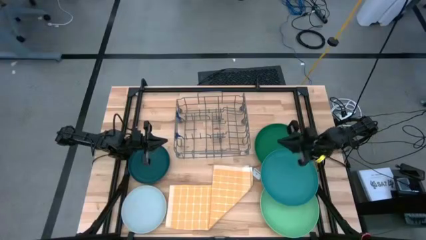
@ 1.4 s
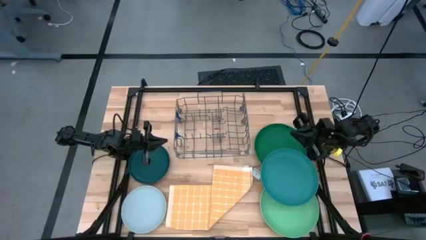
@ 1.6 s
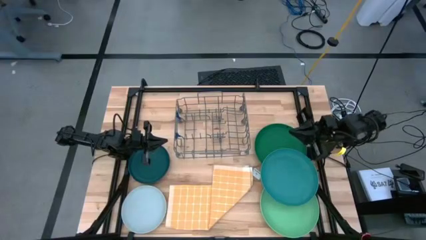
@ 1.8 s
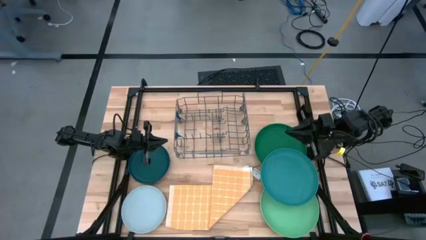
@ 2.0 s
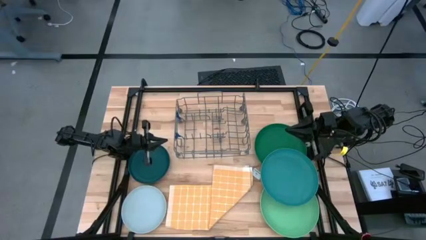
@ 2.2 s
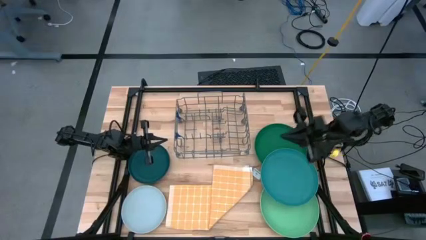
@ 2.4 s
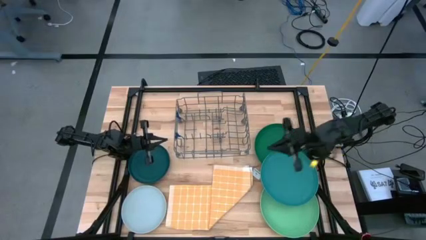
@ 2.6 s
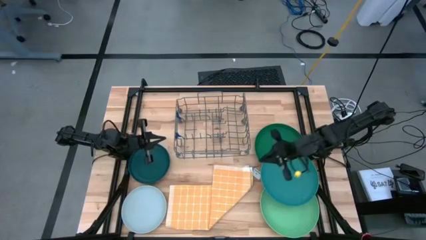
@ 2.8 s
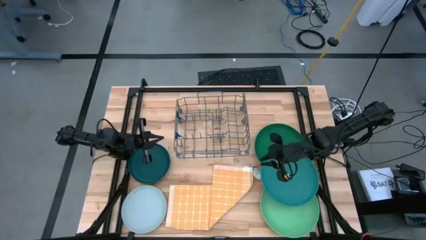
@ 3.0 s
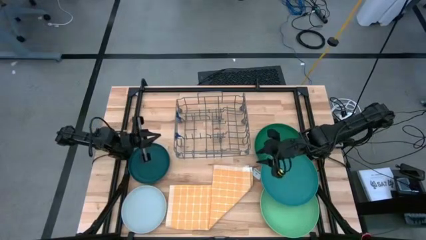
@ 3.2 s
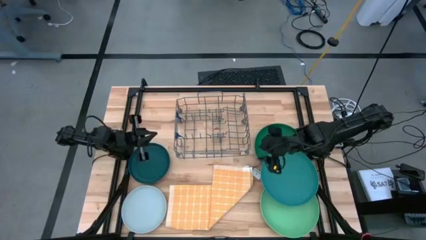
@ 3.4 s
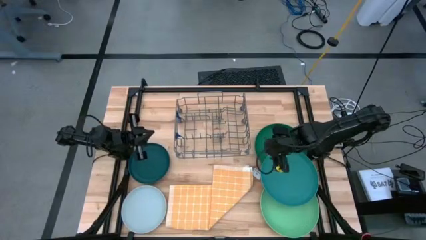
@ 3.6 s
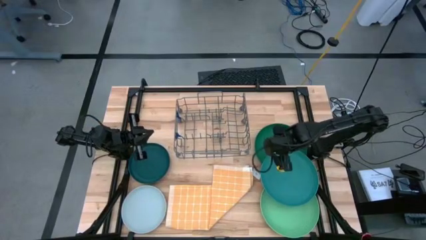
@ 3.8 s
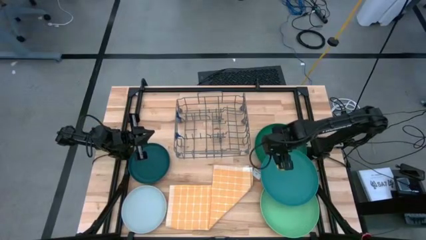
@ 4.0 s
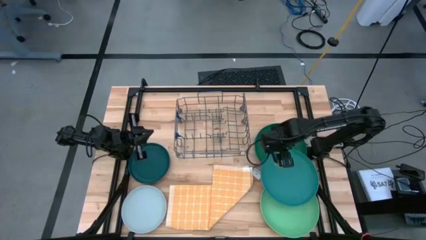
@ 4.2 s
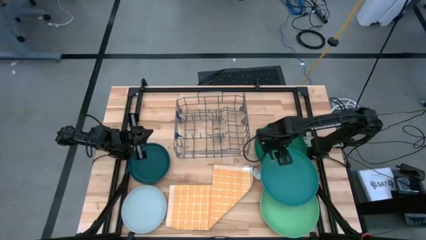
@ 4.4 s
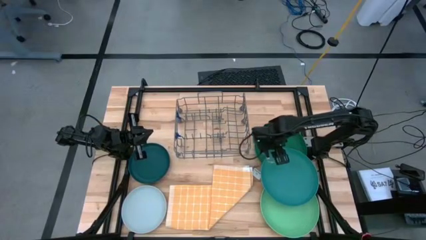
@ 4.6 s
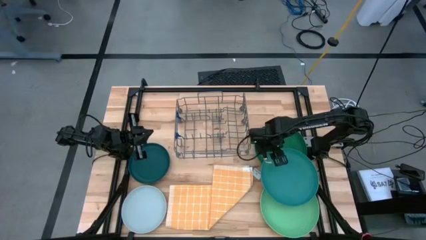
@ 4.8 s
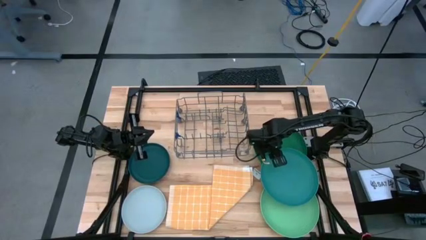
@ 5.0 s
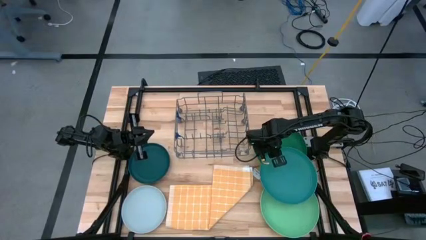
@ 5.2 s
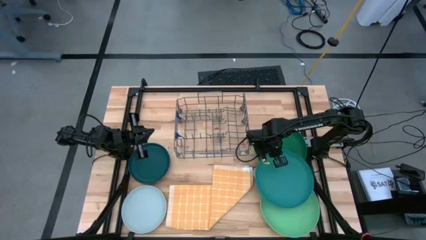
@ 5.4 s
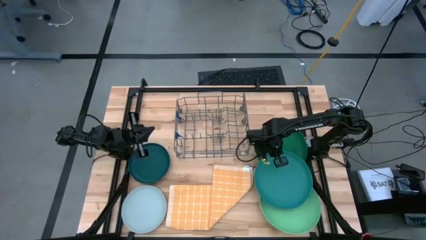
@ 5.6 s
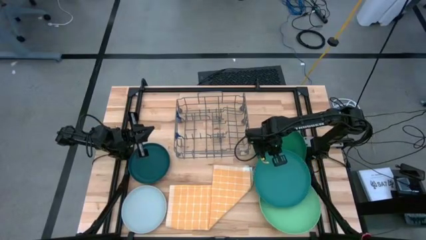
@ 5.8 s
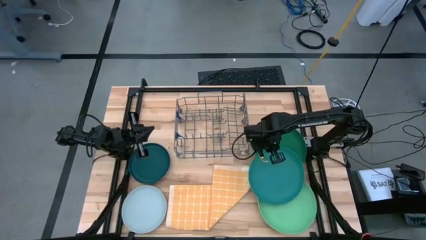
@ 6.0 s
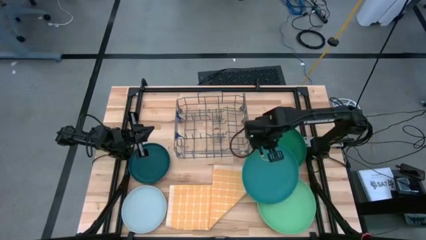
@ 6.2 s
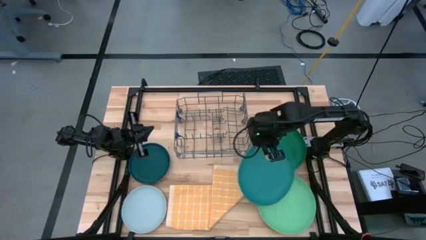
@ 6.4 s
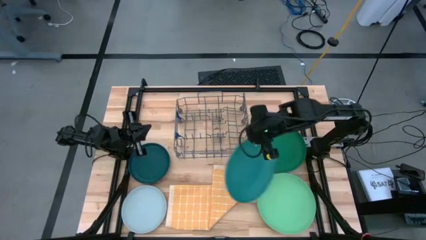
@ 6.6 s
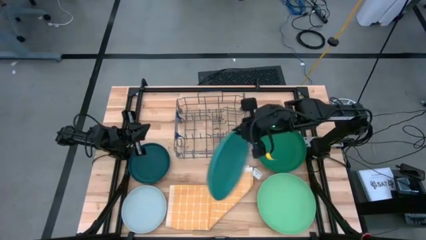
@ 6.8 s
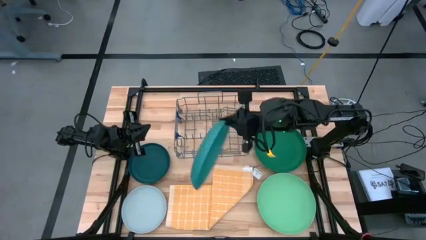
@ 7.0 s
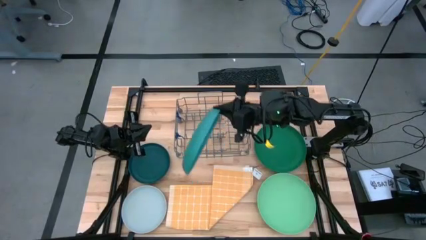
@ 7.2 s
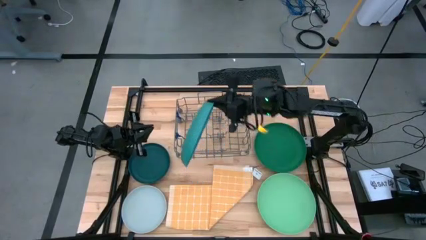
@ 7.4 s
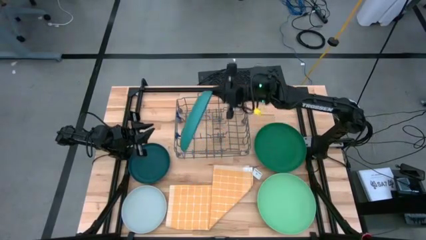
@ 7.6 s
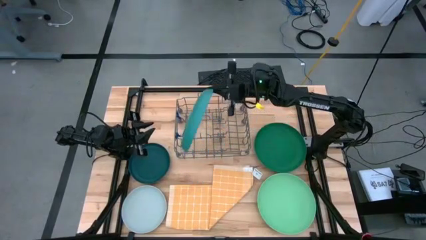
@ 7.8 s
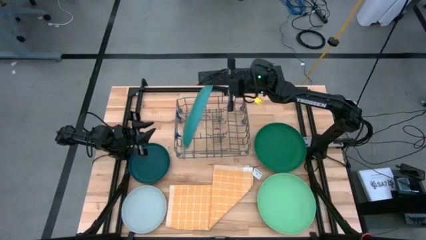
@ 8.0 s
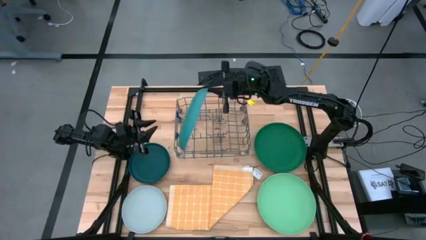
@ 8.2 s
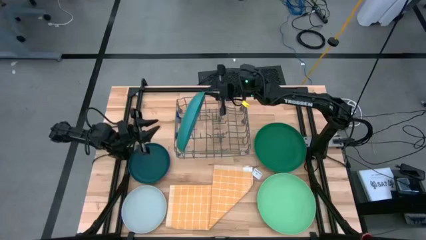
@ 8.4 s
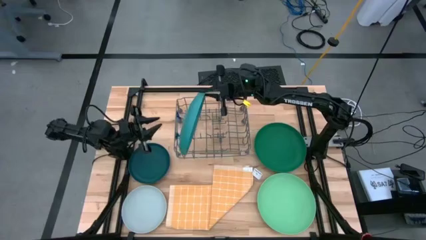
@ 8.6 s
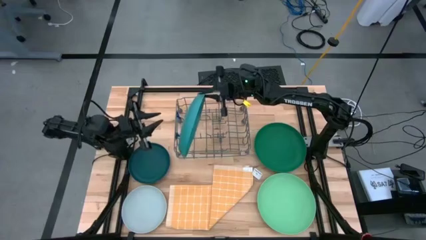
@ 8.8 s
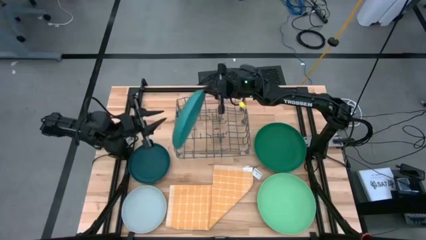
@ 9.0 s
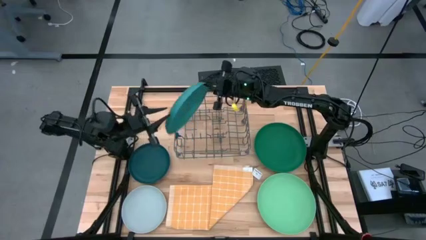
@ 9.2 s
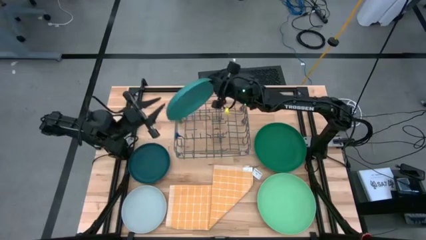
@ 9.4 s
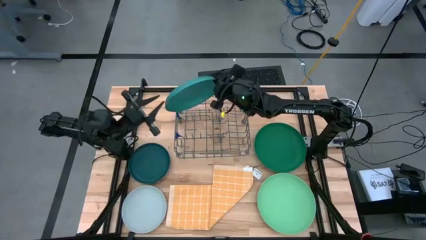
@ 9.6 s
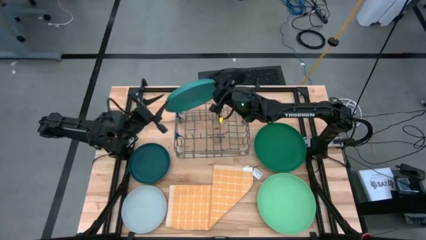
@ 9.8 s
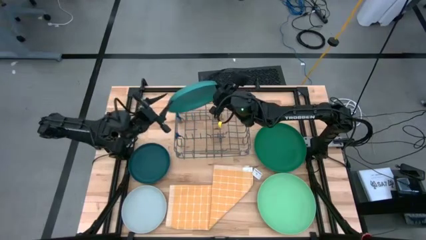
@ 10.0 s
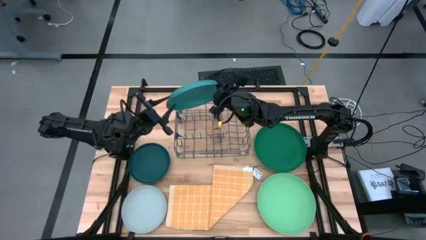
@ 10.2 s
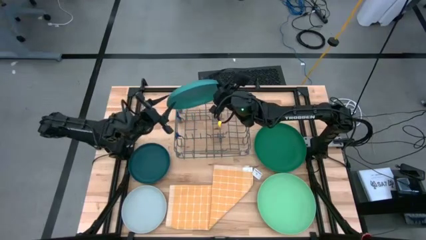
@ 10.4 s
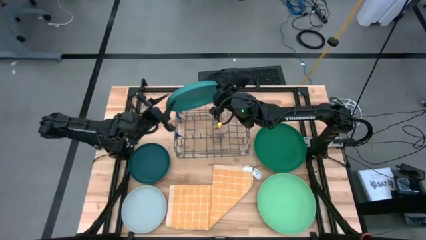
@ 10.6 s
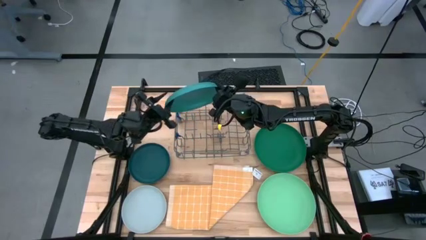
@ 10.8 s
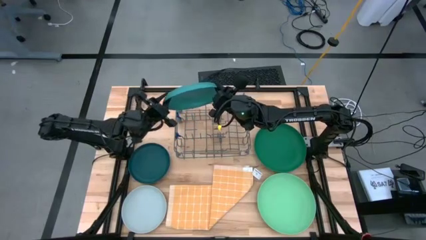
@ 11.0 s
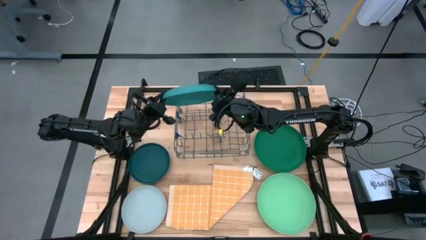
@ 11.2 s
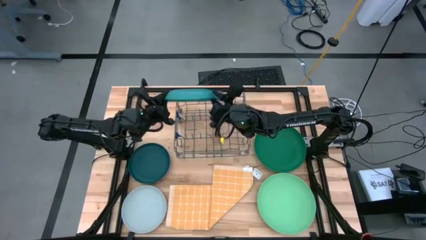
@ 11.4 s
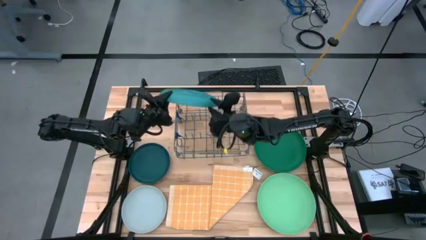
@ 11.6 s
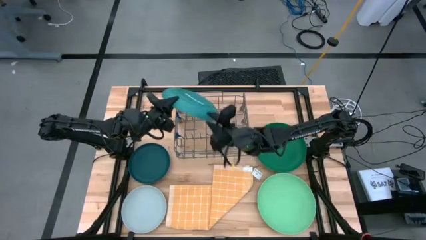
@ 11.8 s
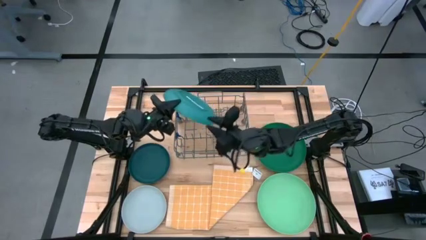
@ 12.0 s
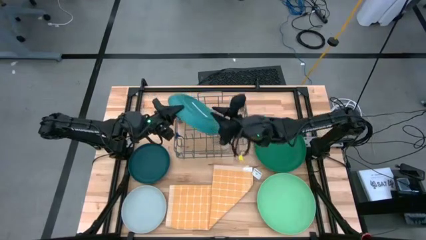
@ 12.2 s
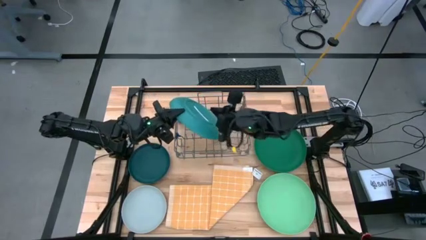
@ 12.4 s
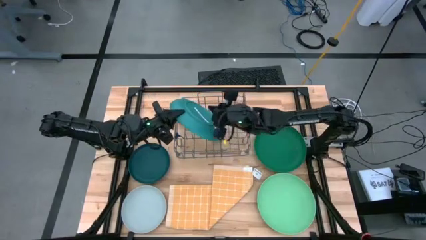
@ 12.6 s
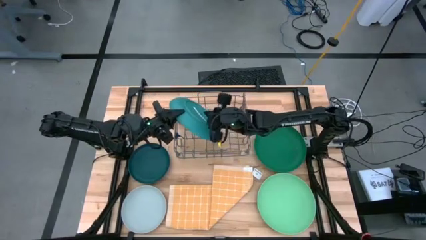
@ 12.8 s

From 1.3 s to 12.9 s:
Task: Sort dishes
Put the blue plate on the dish rack

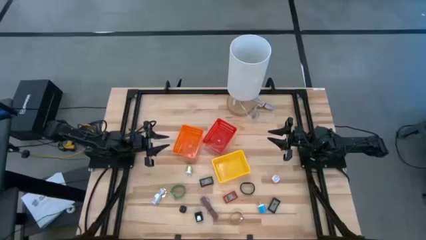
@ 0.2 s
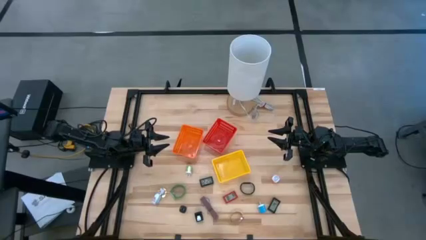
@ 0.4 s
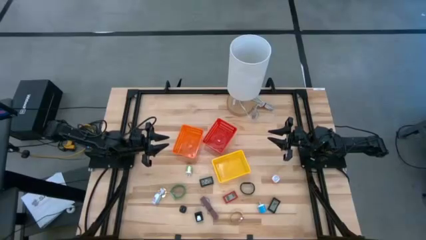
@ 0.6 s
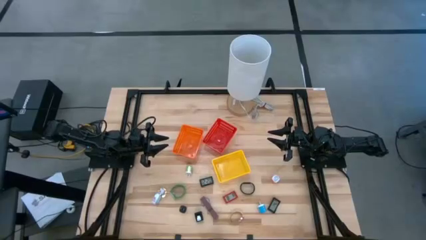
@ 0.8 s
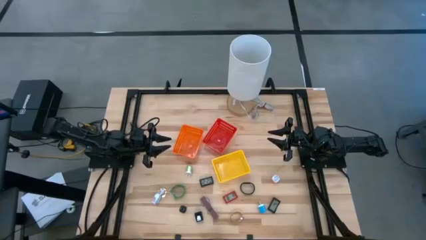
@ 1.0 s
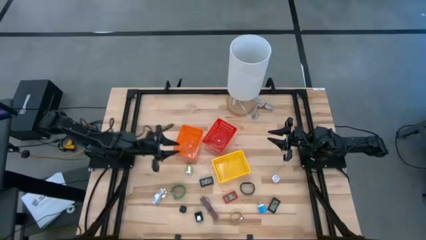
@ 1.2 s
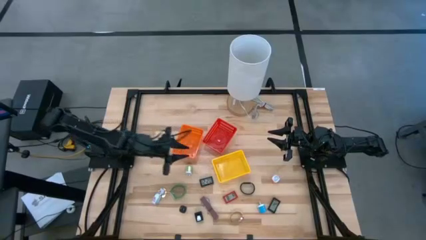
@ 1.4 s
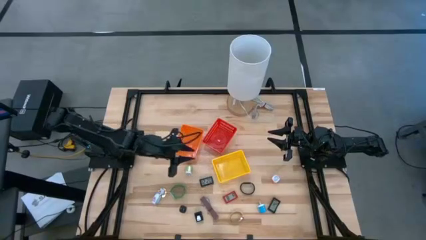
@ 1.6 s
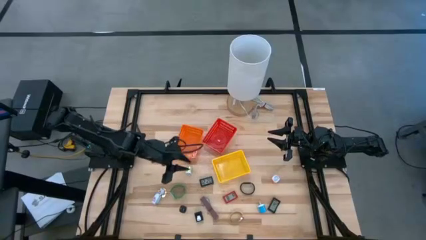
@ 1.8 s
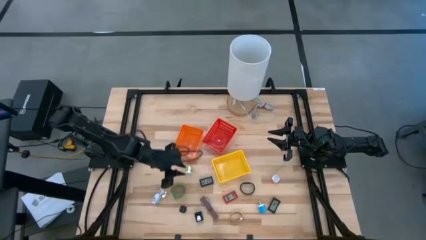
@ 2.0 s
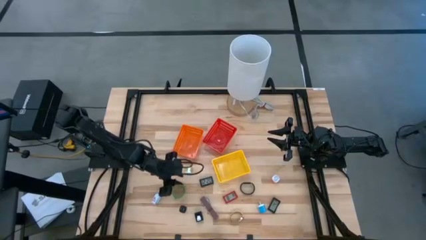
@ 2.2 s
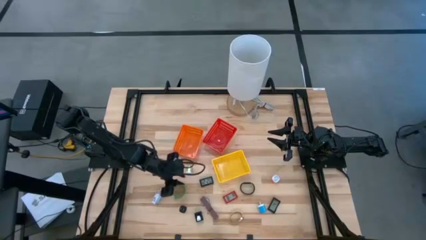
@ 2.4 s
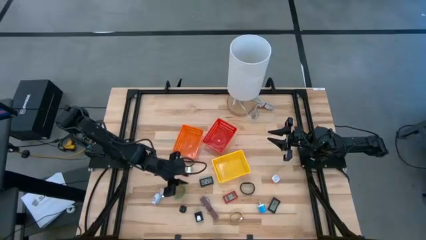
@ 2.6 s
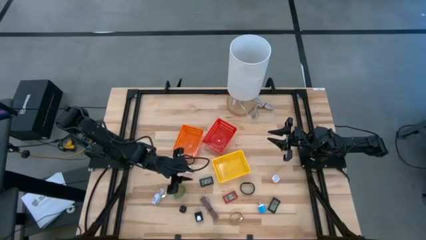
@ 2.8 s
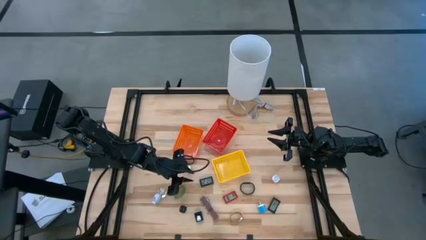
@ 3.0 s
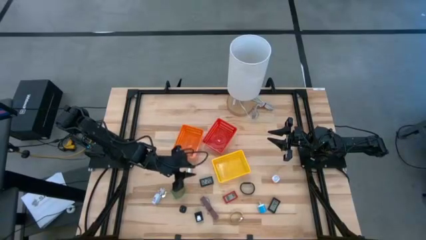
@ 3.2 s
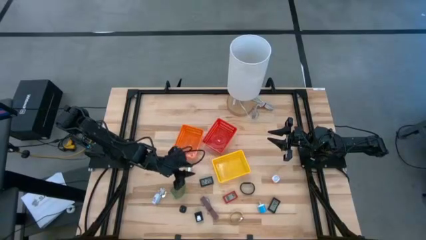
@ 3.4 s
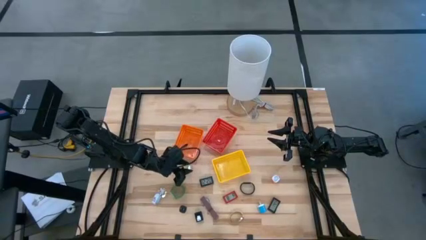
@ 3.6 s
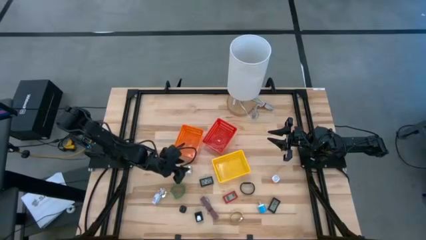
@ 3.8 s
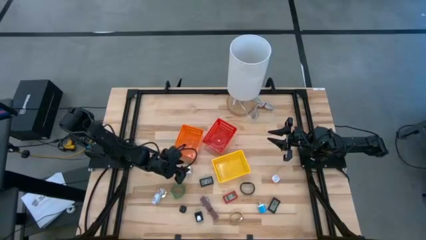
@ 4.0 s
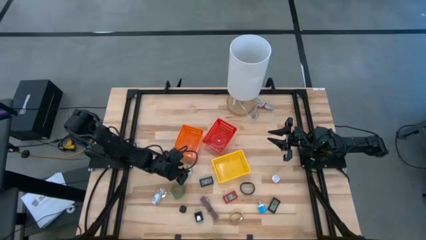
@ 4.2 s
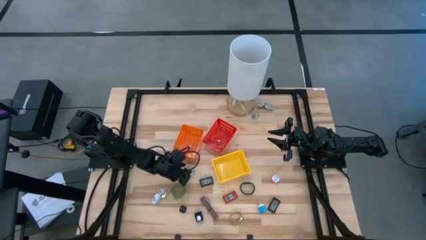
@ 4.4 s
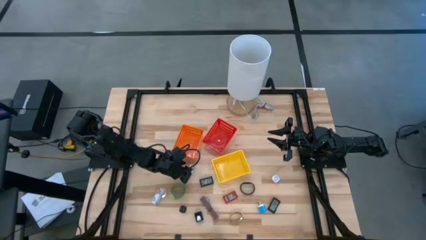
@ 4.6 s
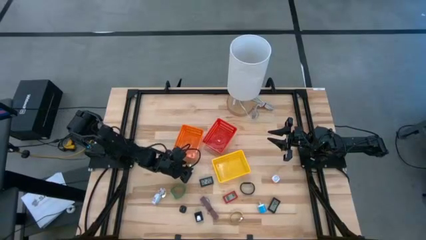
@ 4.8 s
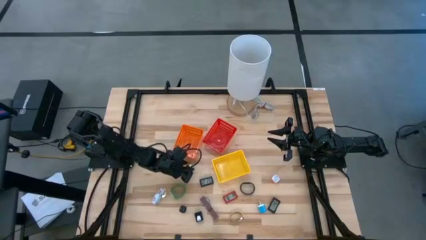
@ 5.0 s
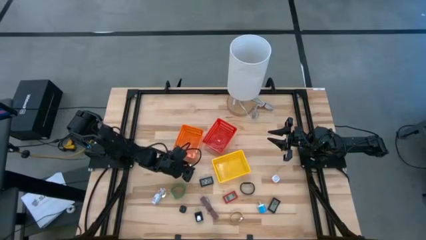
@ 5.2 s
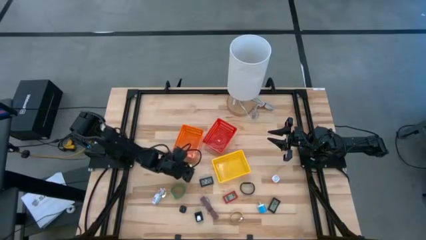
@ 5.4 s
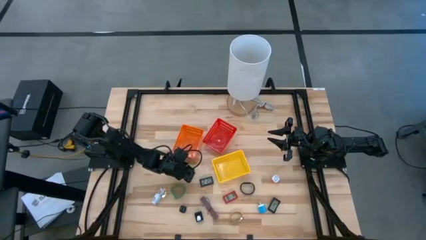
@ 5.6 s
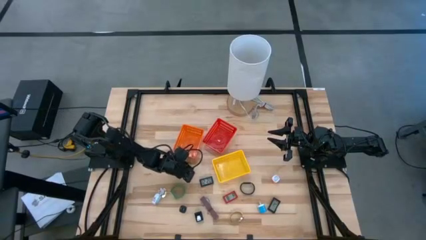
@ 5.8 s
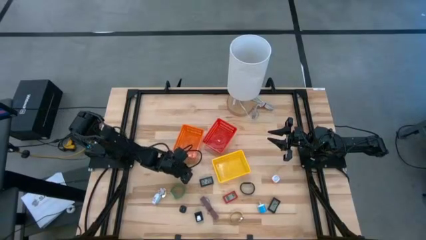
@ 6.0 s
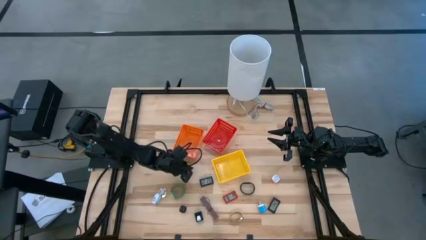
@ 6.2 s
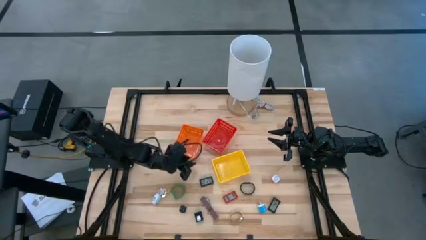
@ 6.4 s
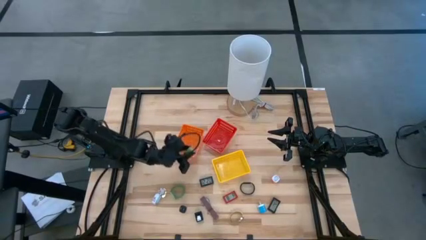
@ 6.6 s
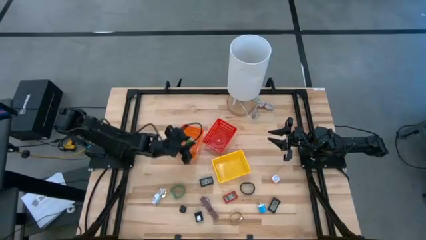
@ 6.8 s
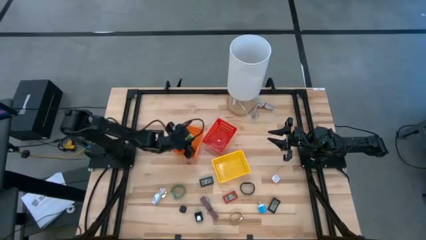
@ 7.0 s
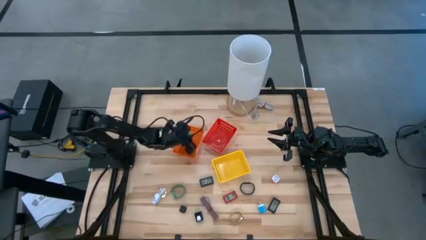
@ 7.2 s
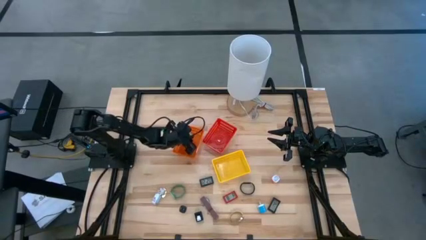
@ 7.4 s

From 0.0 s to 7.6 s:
Task: Pick & Place Office items
Put the green charger adapter into the orange bin
